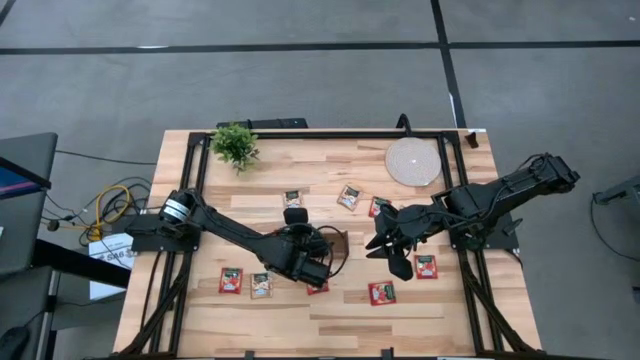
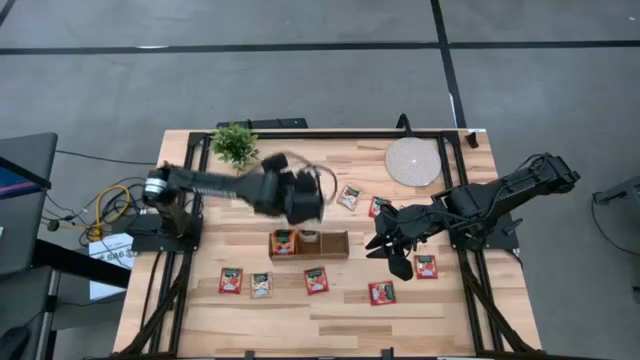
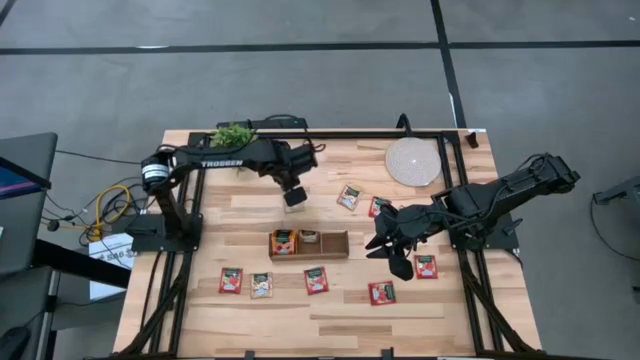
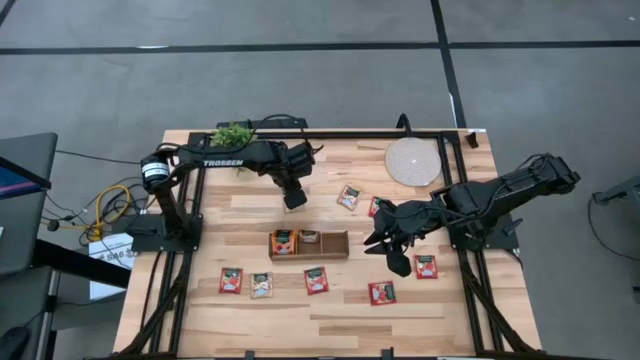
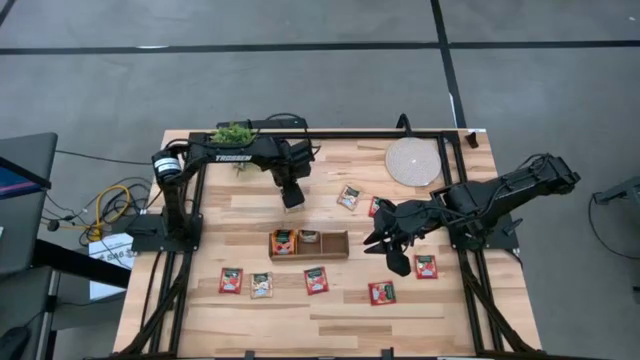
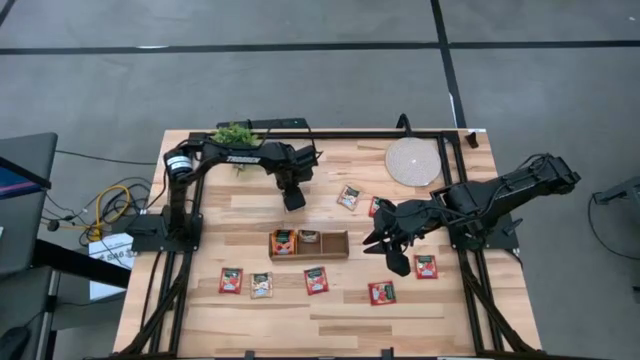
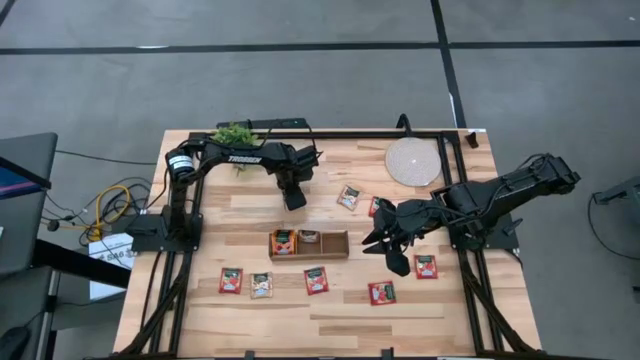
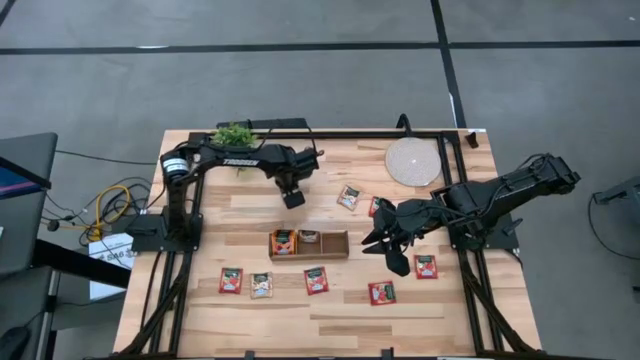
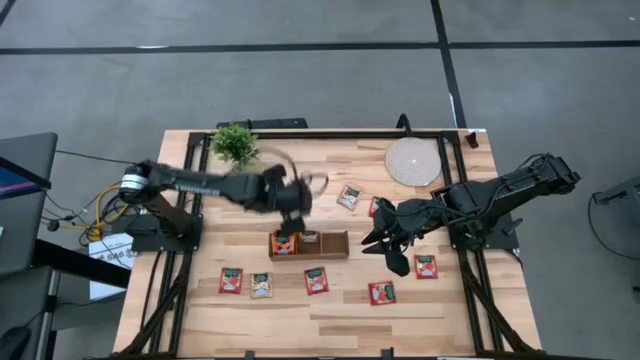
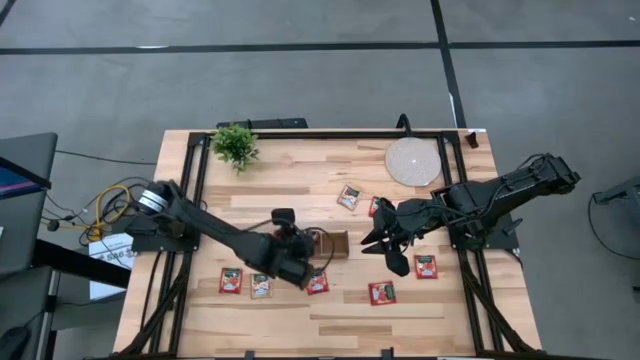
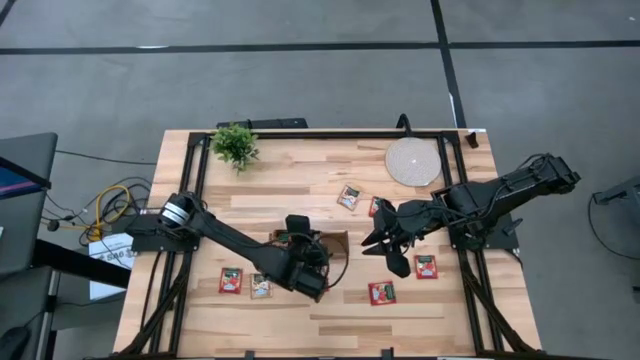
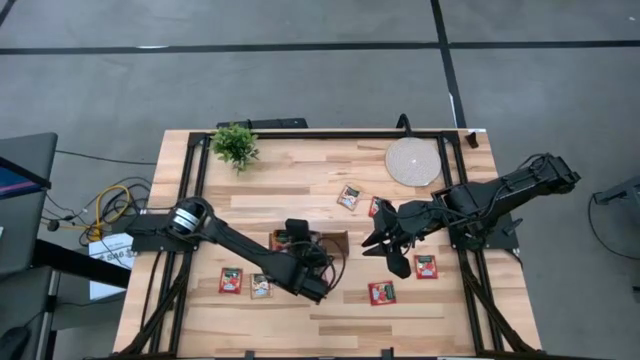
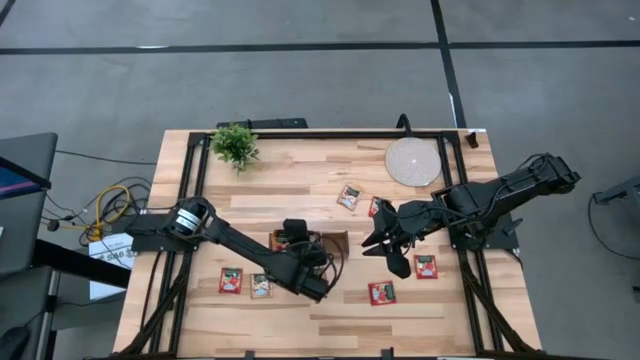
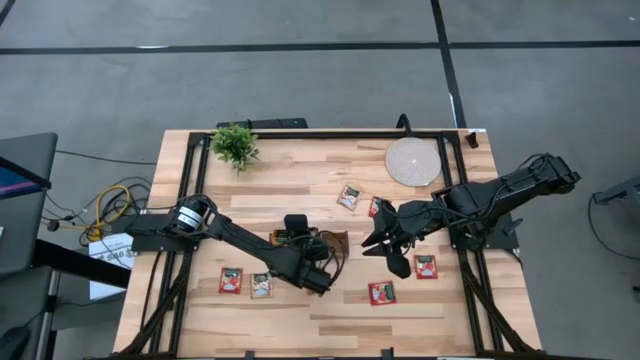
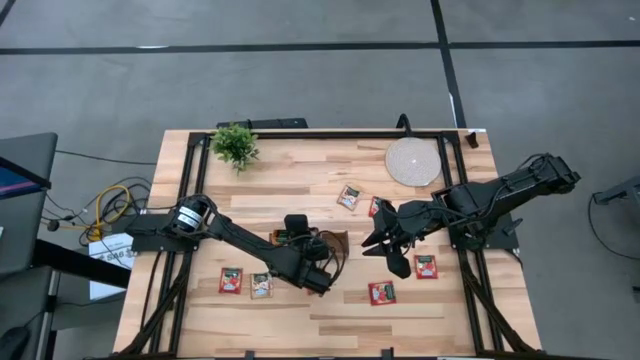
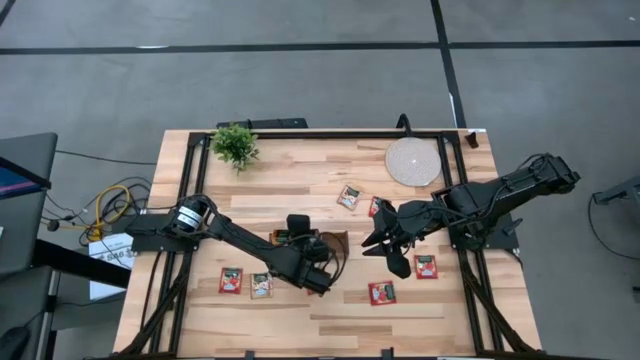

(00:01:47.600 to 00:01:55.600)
Task: Pick & Place Tea
Put the brown tea bag into the middle section of the wooden organizer

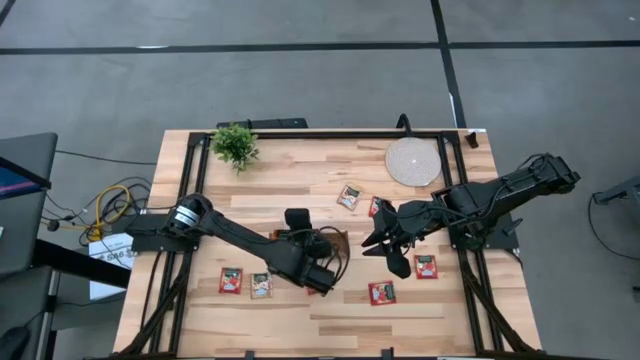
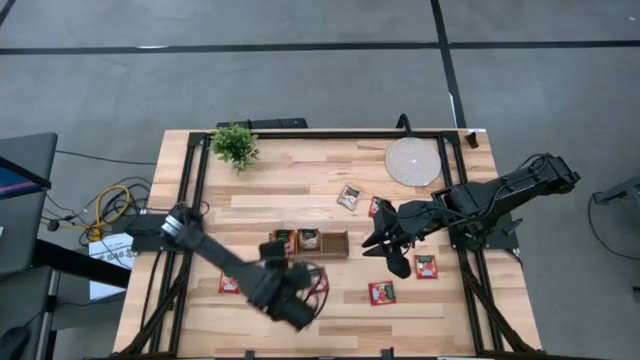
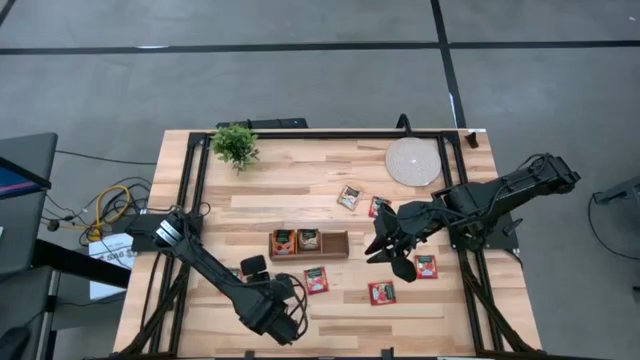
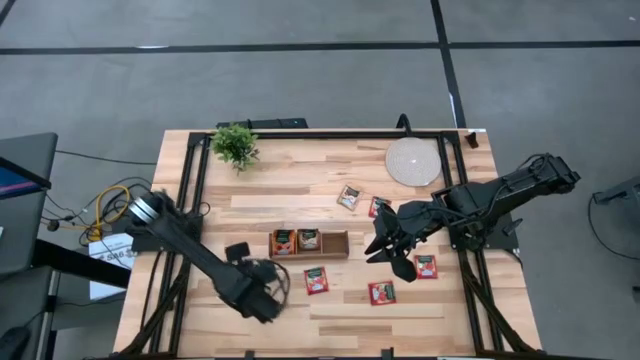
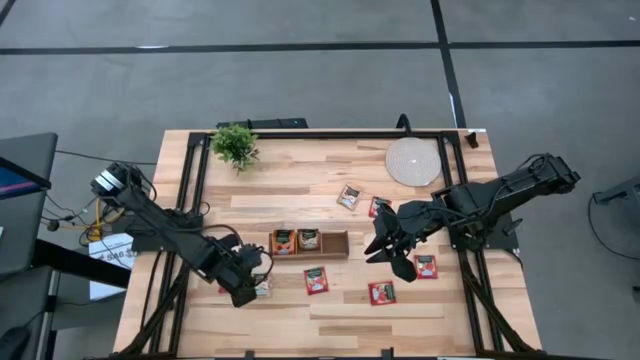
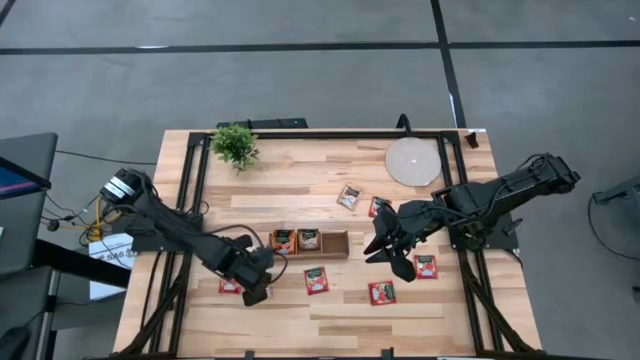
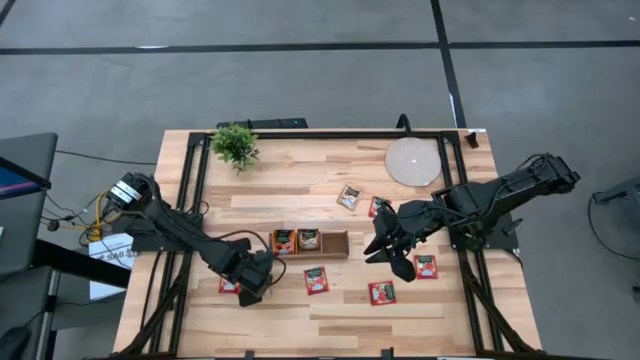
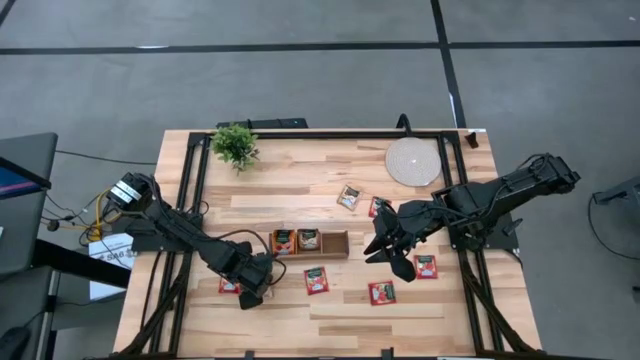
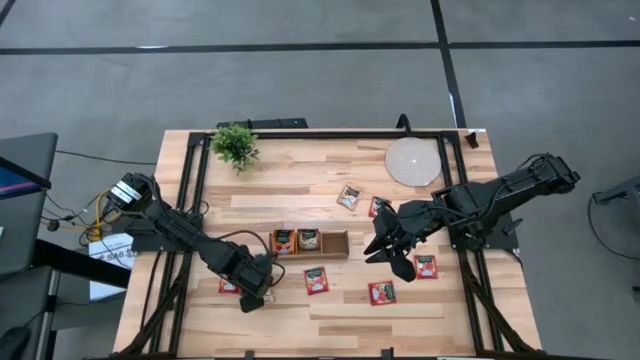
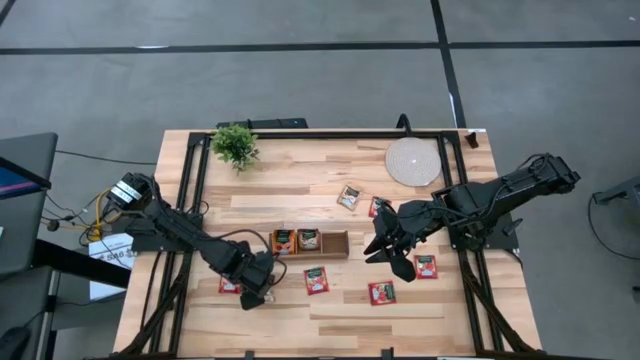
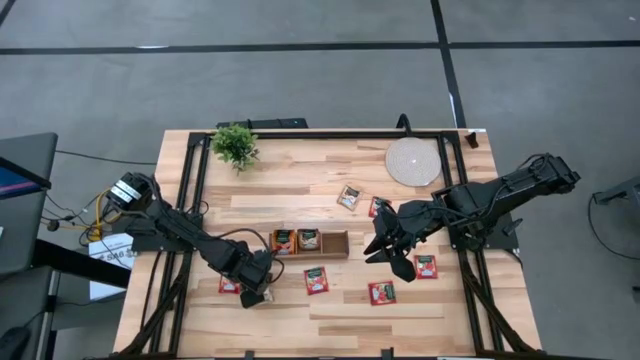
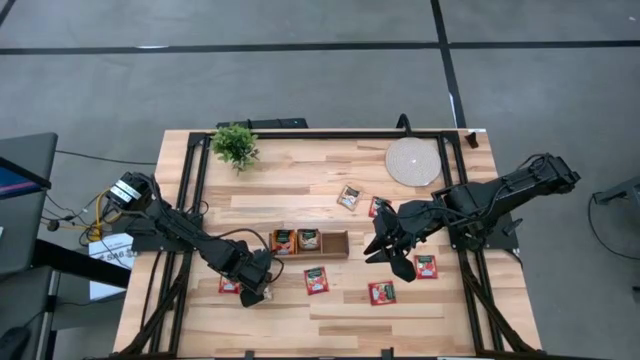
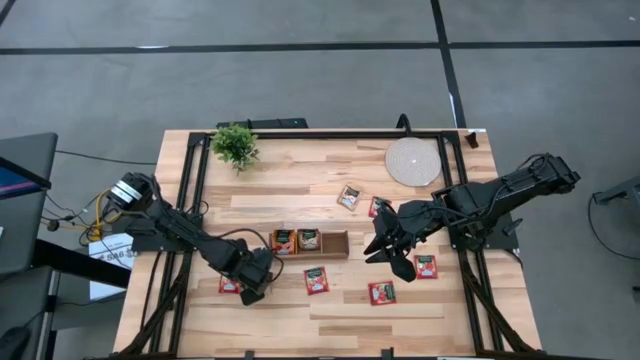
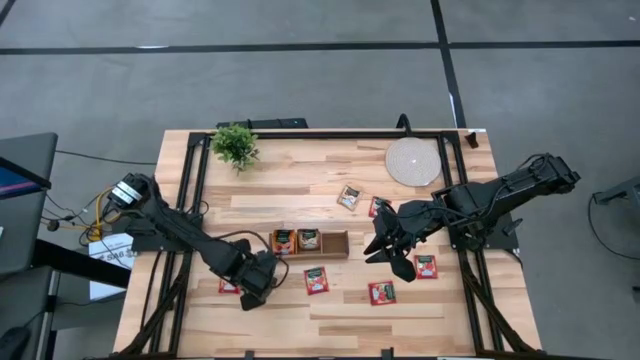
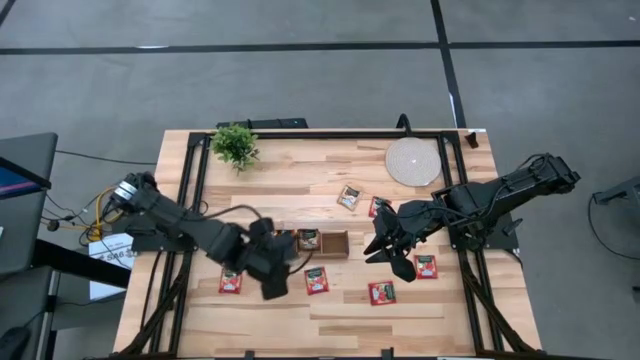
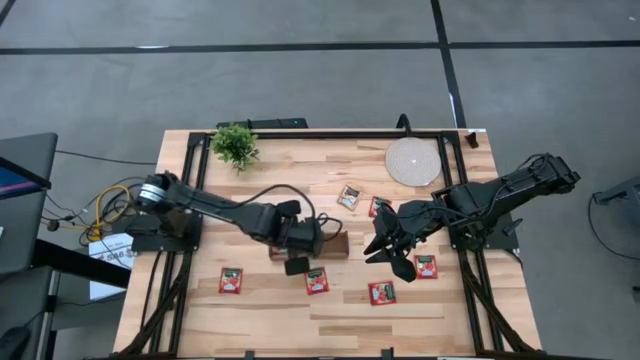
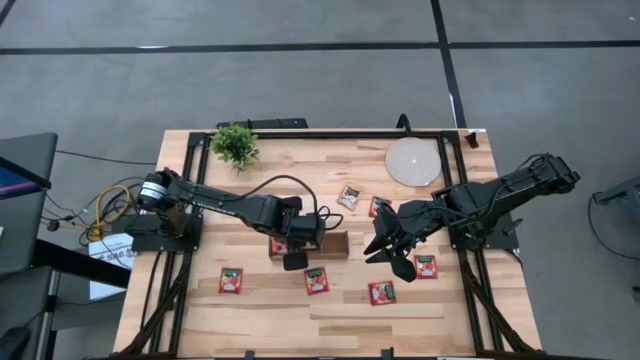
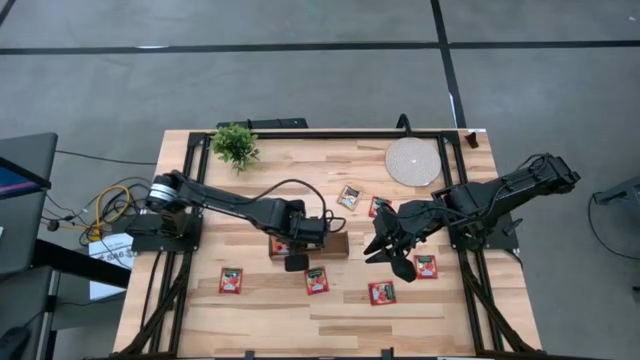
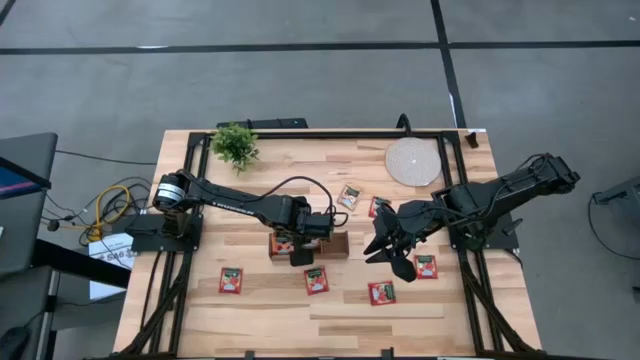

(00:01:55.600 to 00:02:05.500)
Put the brown tea bag into the middle section of the wooden organizer

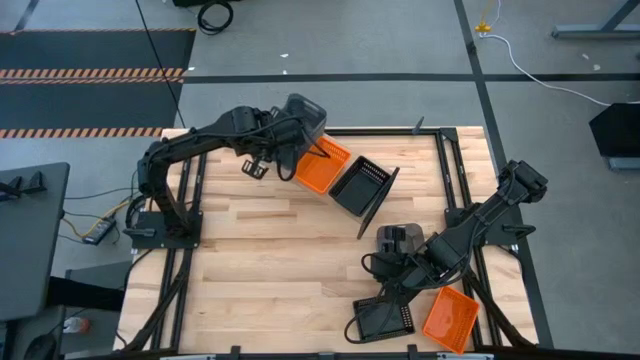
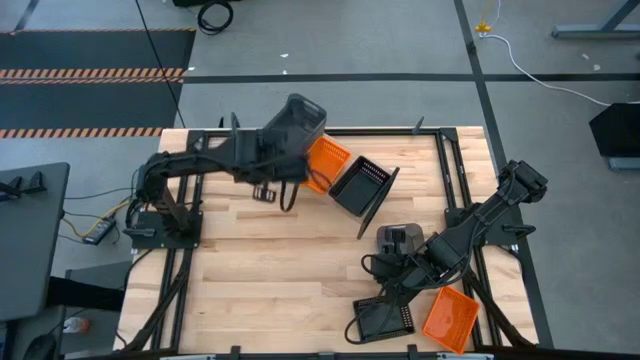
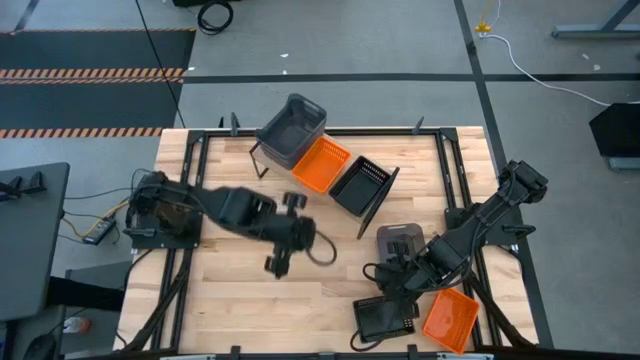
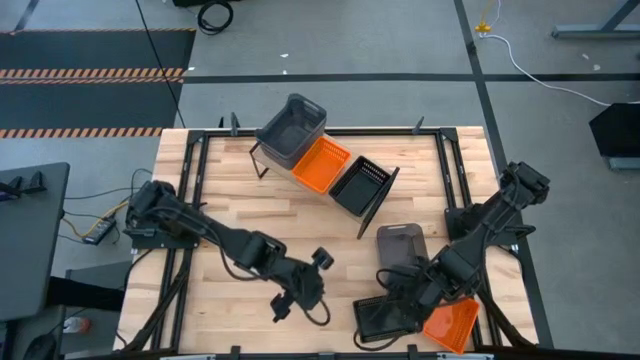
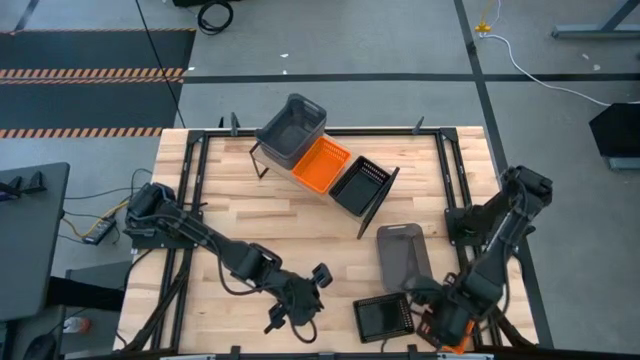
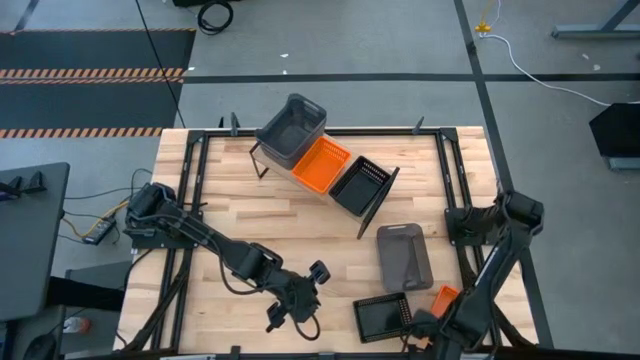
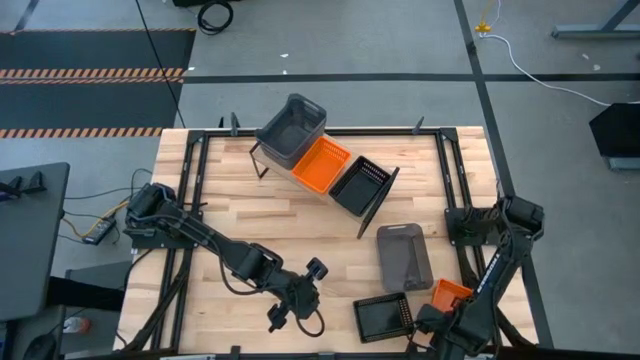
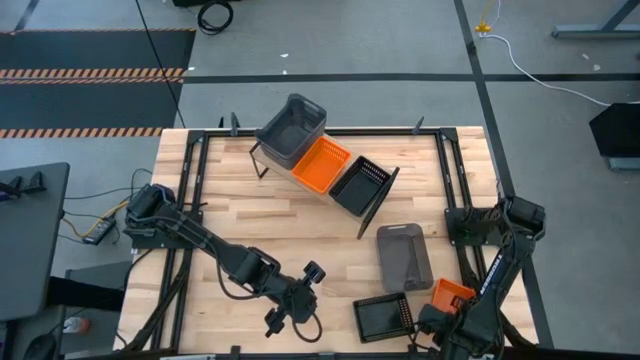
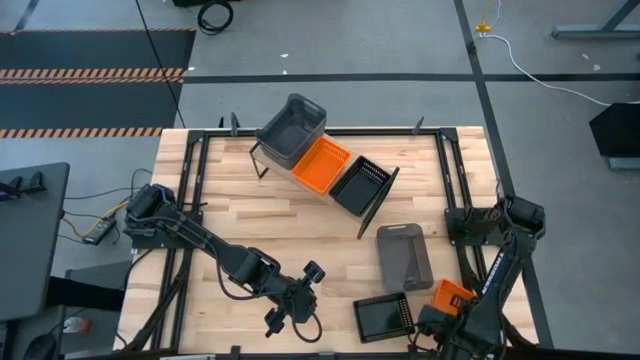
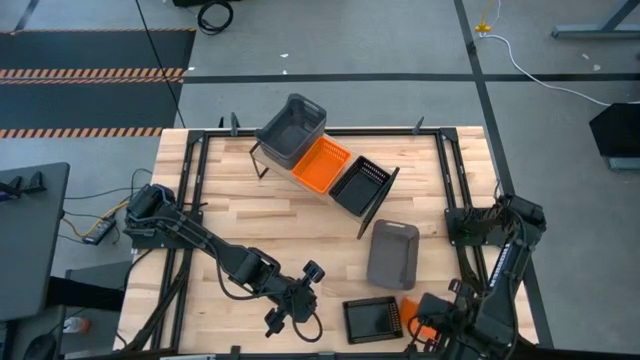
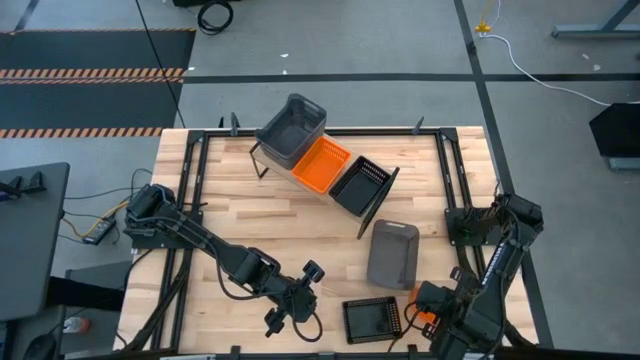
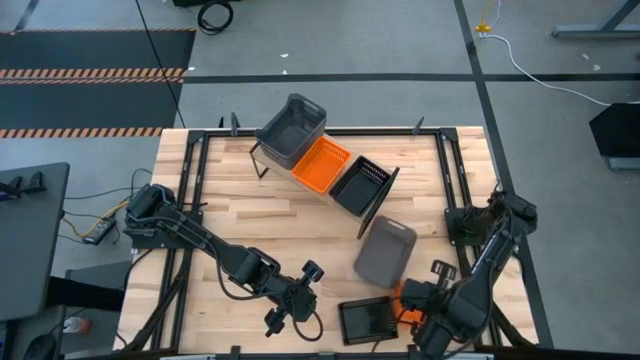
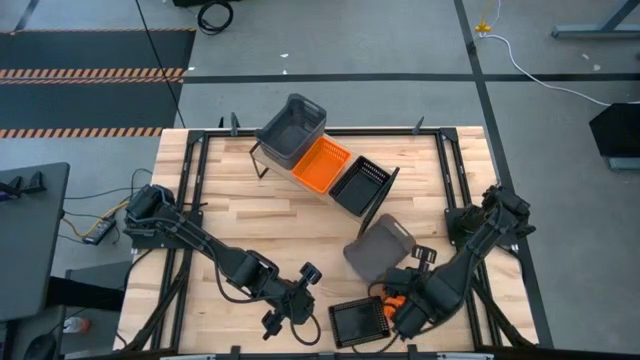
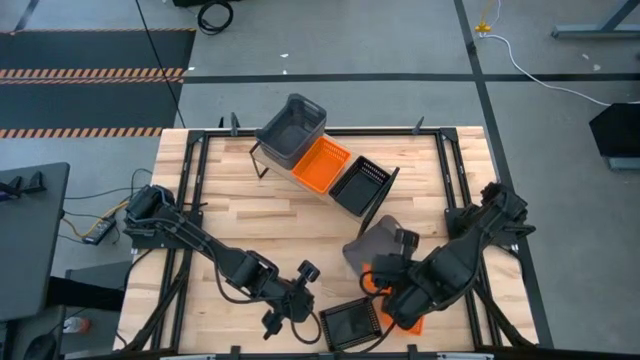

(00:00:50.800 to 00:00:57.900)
Task: Stack baskets on shelf by color
Stack the top orange basket on top of the other orange basket on the shelf
